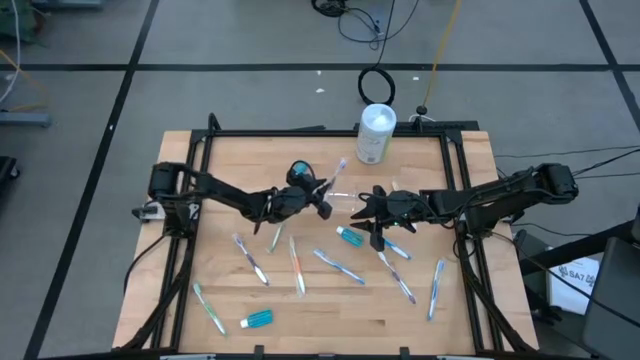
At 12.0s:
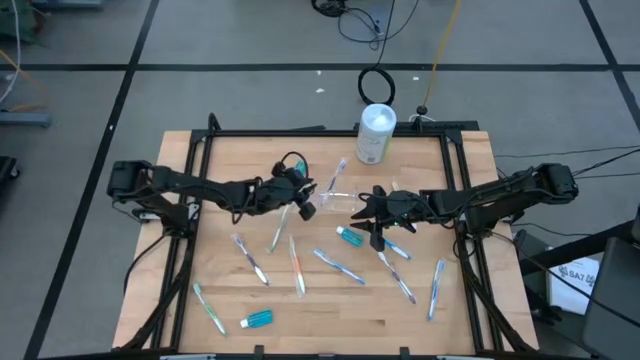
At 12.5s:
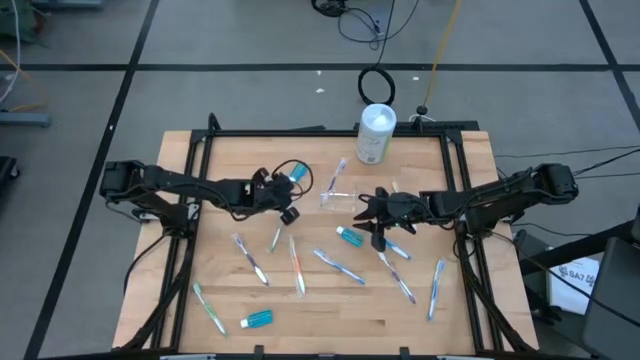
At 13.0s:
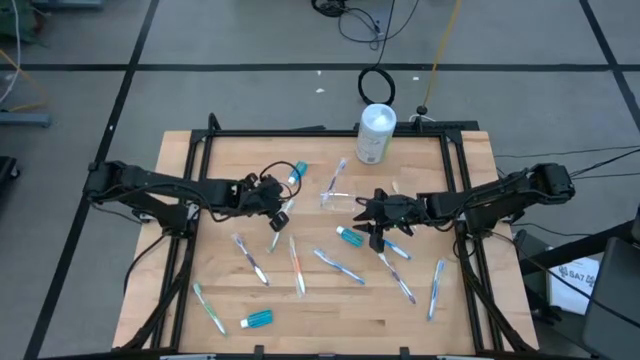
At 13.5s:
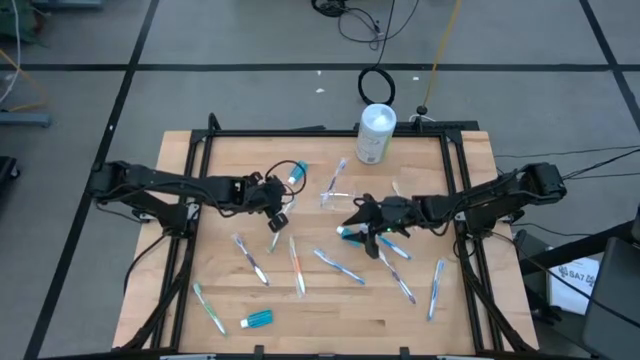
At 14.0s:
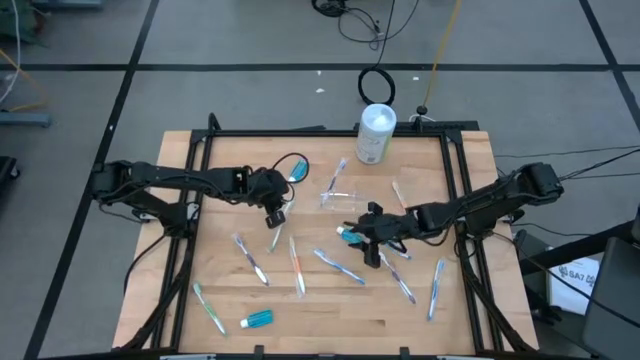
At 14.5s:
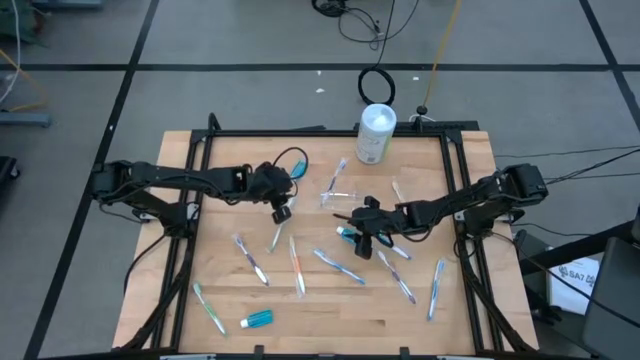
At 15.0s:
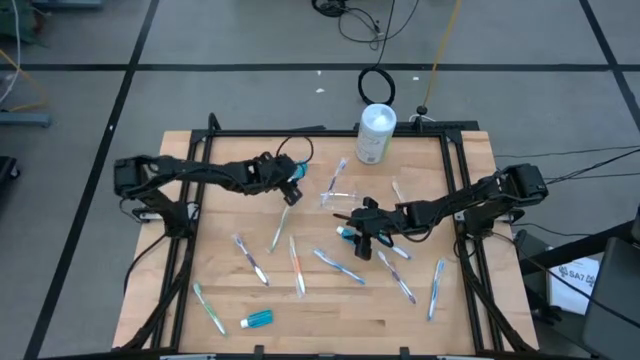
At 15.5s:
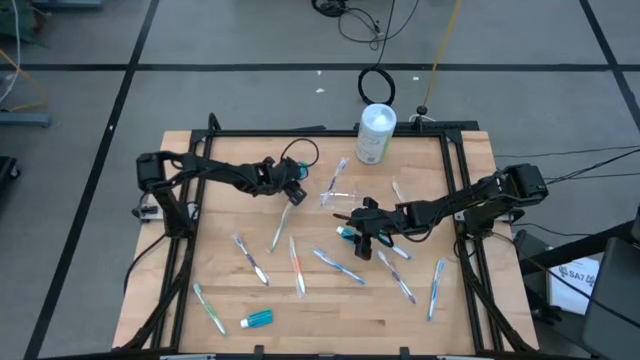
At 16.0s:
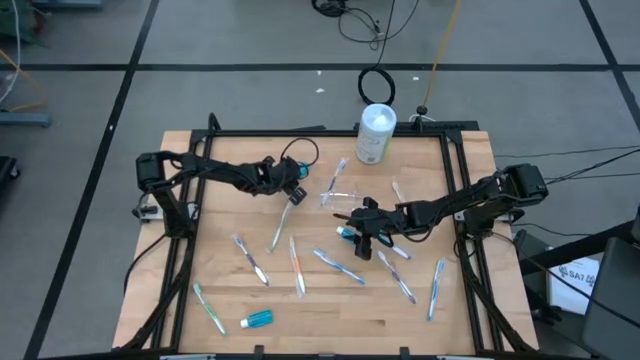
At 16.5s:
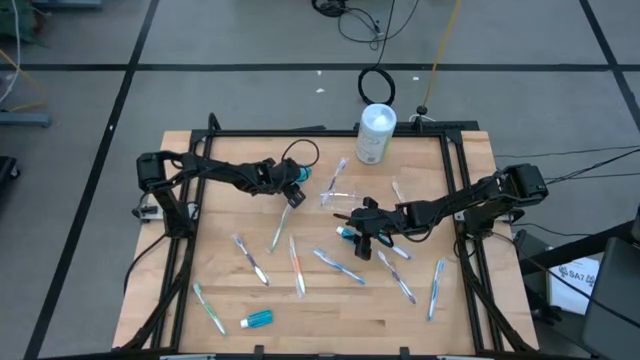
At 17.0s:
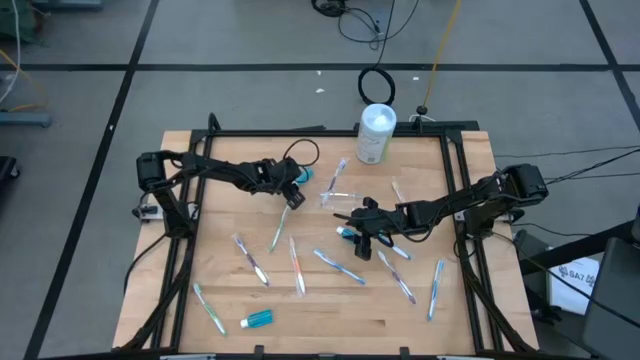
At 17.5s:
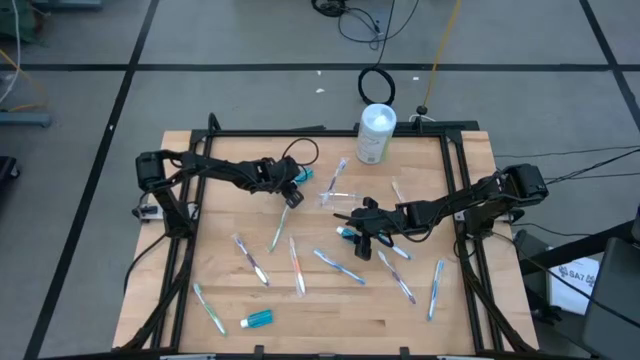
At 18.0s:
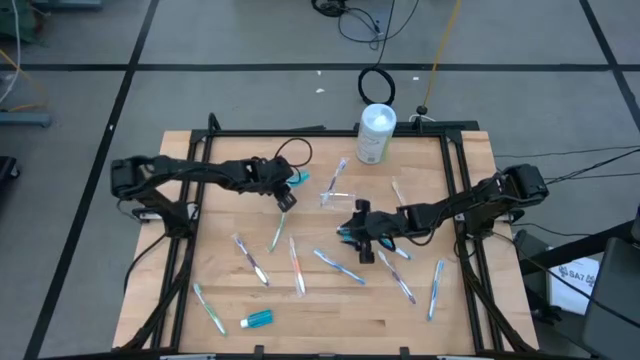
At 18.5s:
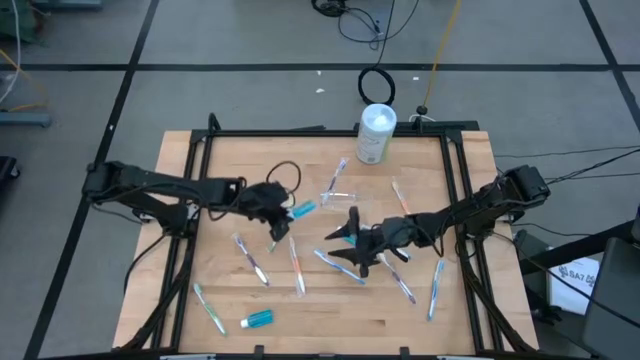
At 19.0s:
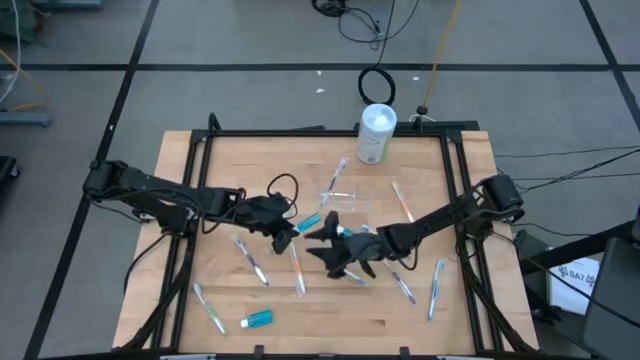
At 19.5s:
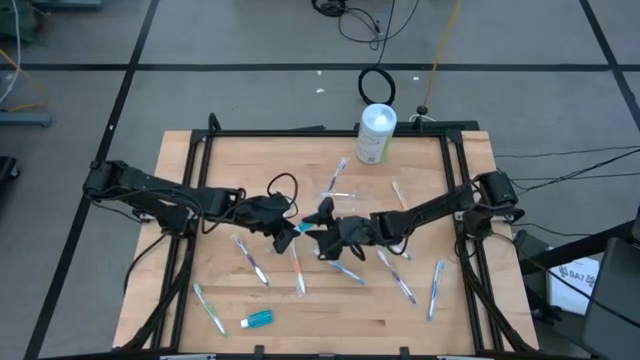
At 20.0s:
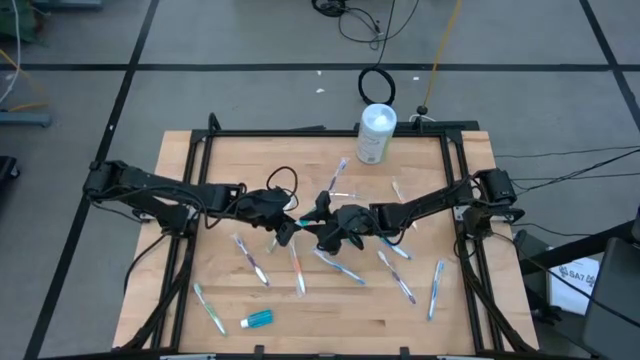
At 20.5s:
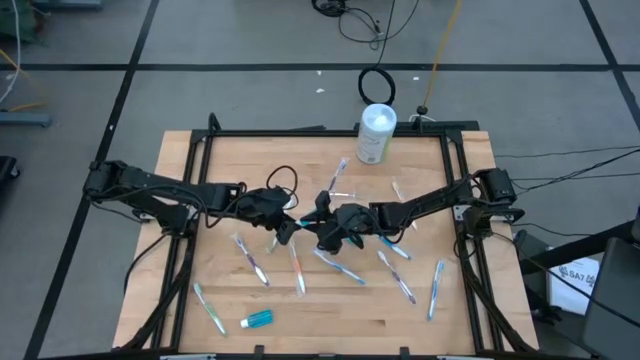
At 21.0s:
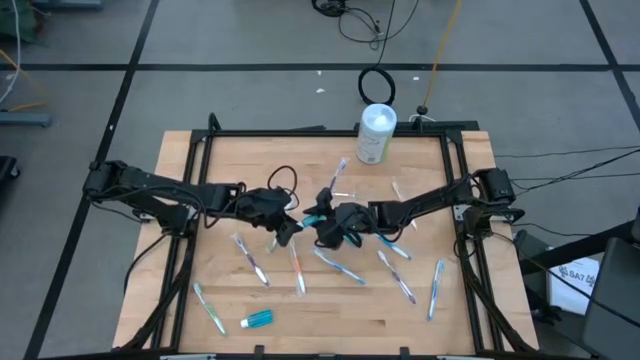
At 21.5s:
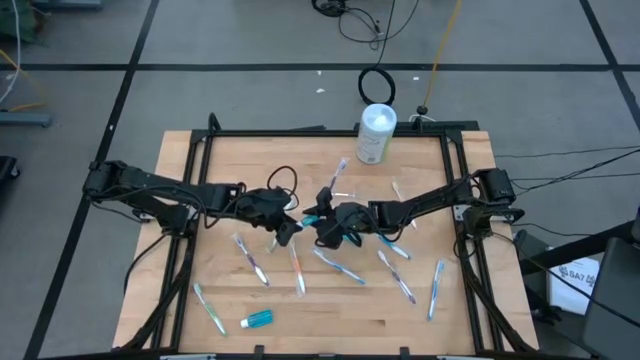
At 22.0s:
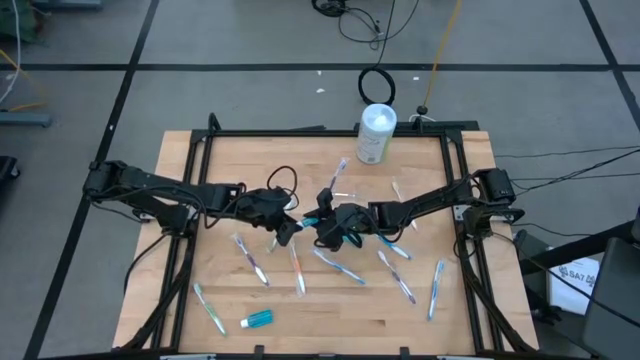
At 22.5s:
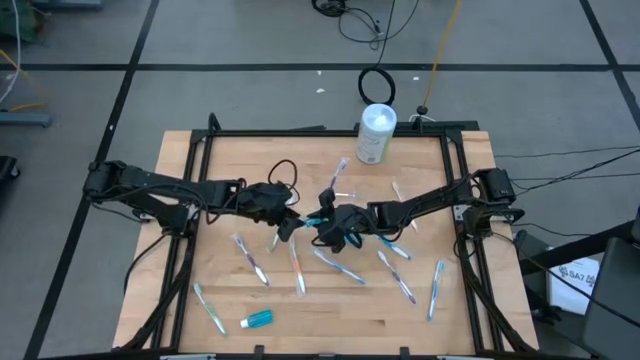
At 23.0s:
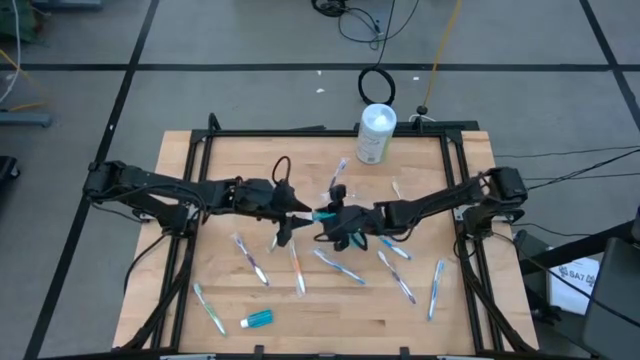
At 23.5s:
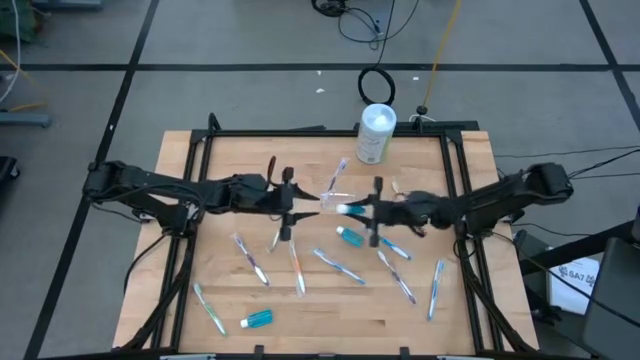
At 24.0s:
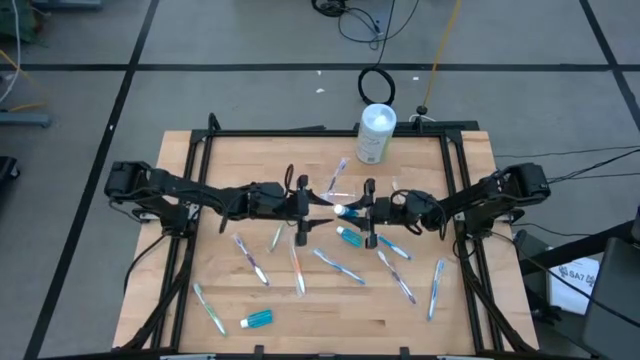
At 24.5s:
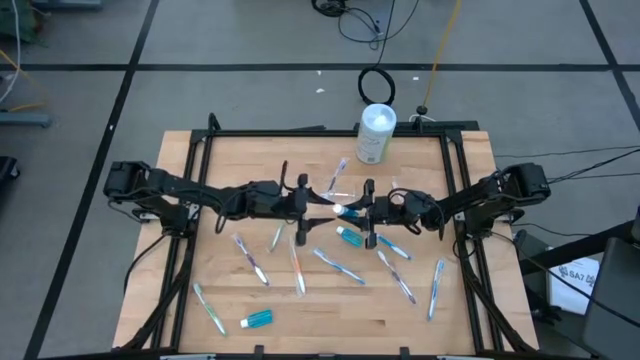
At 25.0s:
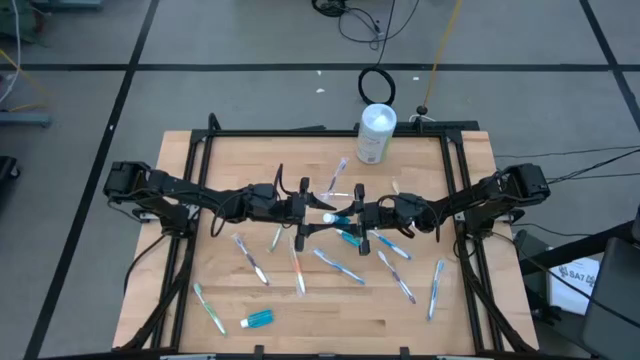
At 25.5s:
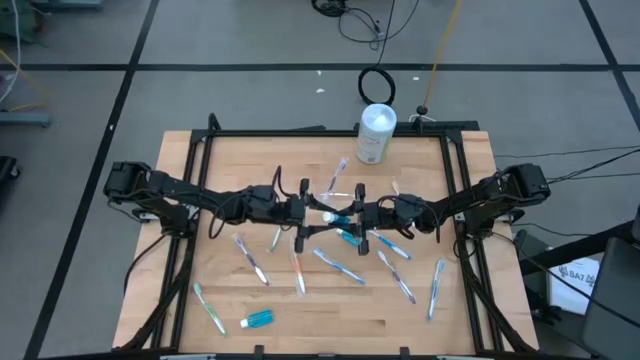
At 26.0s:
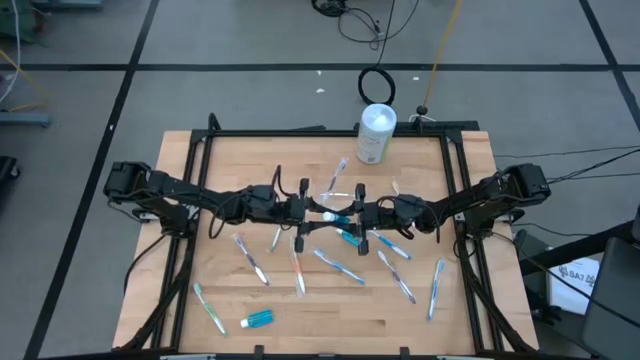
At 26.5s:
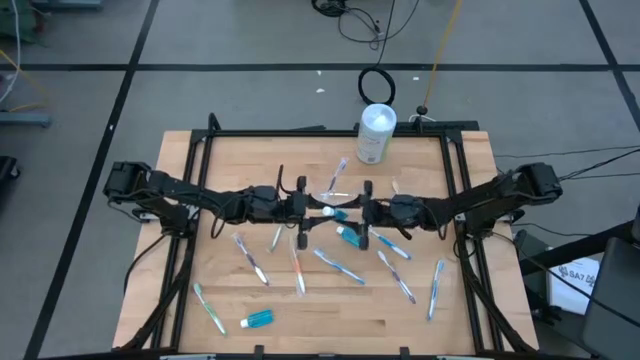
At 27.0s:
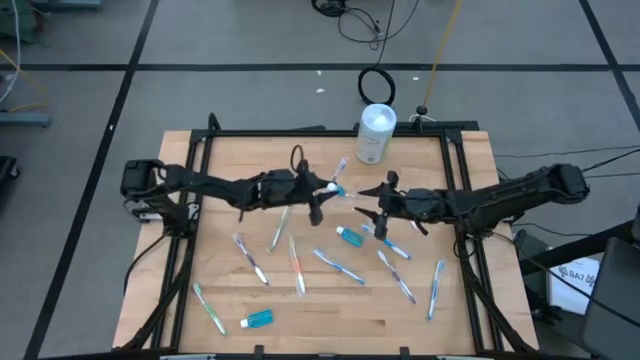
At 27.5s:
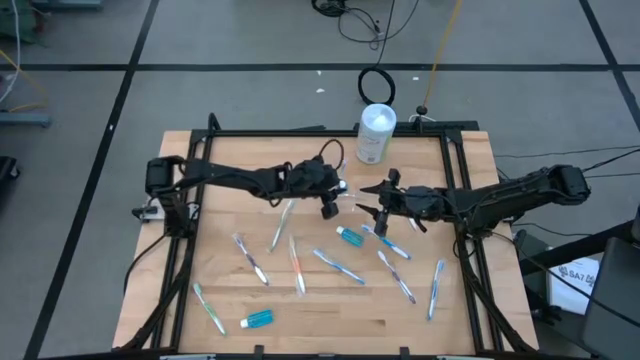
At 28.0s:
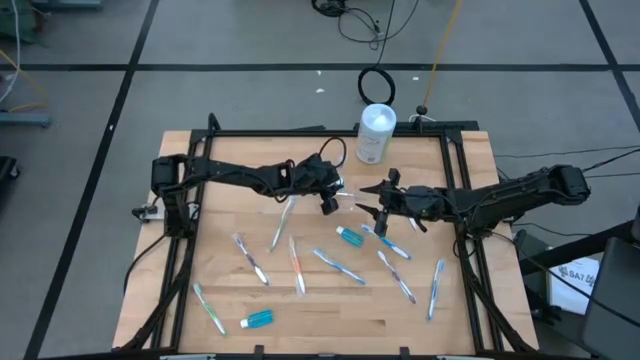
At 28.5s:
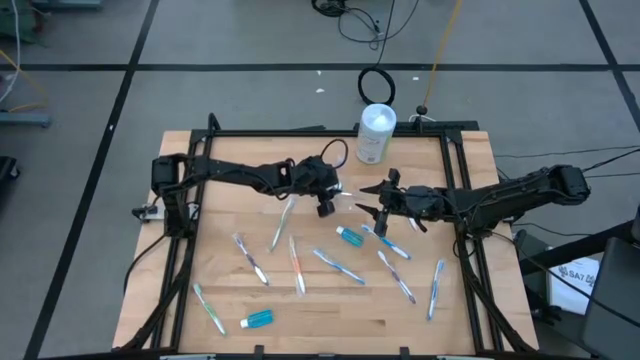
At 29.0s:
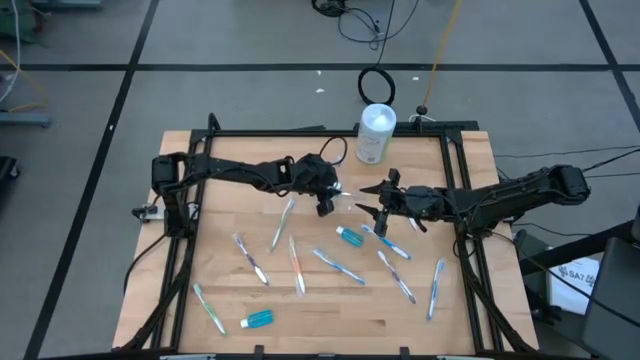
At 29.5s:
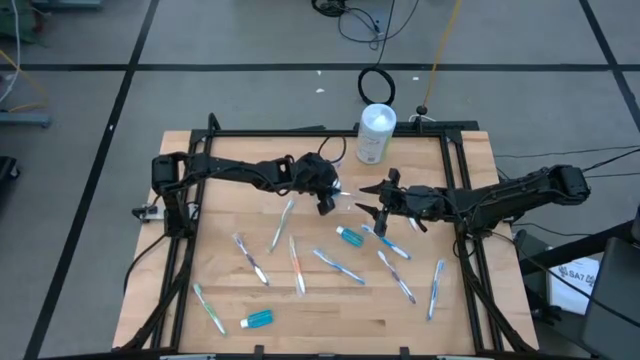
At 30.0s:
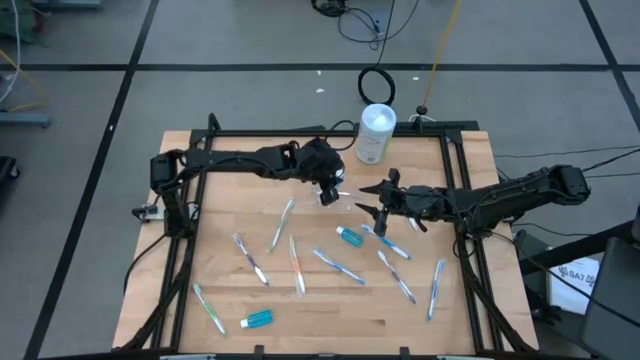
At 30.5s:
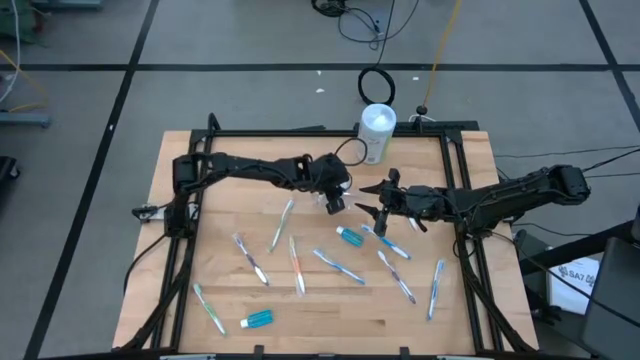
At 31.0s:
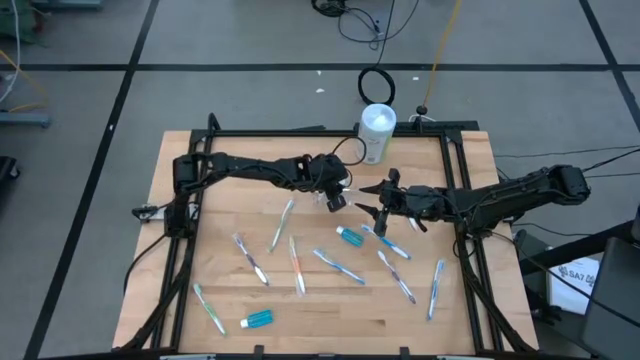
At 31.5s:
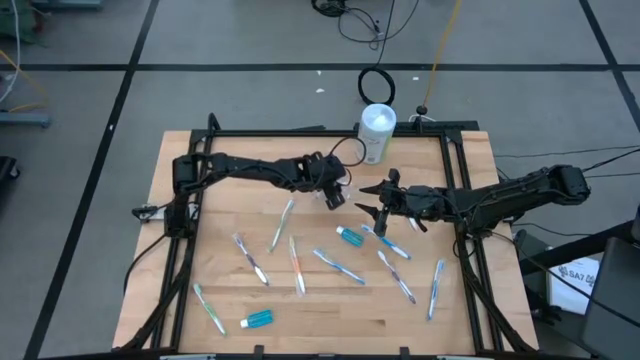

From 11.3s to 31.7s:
Task: Pick & Place toothbrushing station
Put the top blue mouthwash into the transparent organizer
